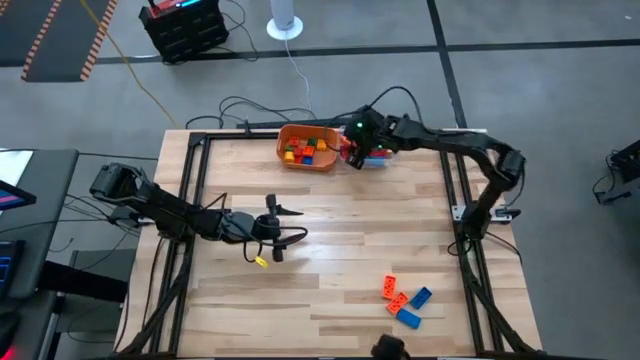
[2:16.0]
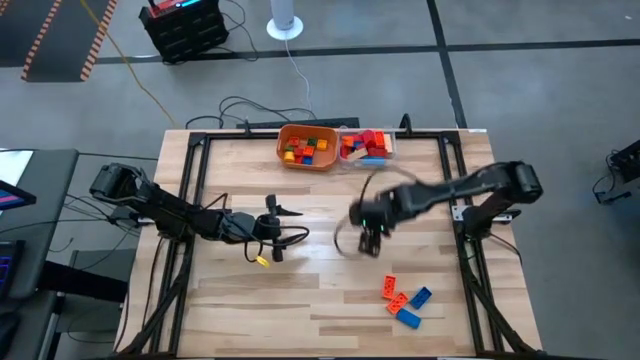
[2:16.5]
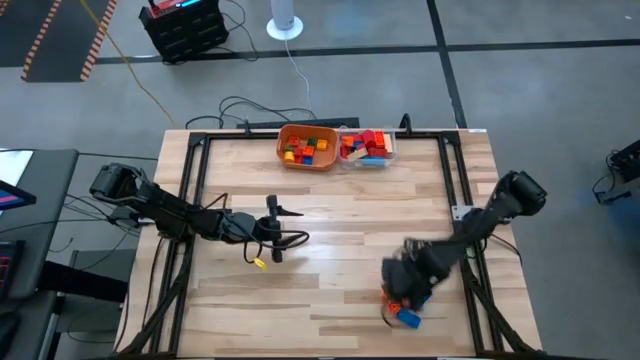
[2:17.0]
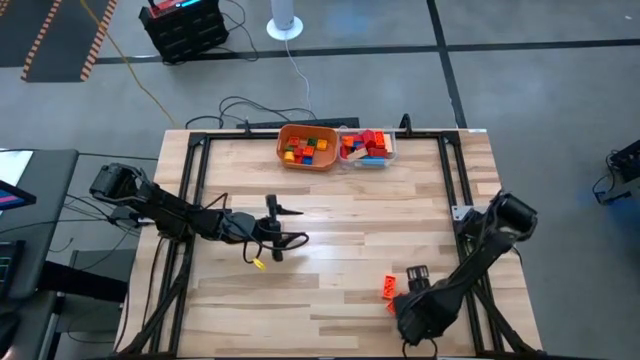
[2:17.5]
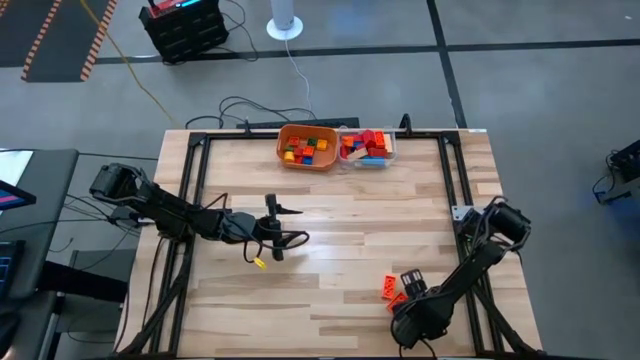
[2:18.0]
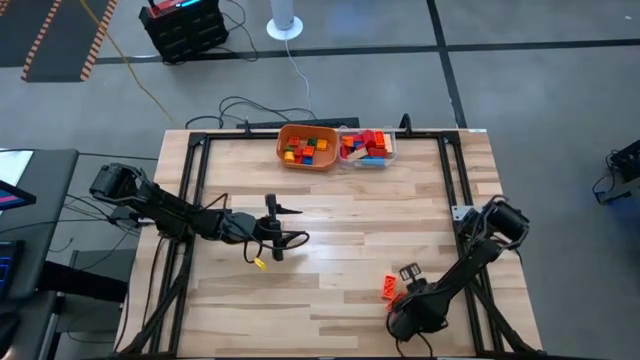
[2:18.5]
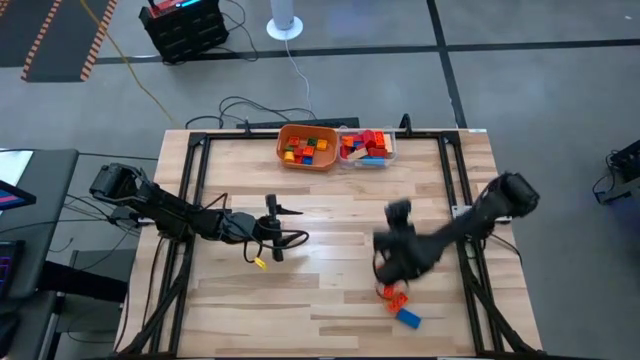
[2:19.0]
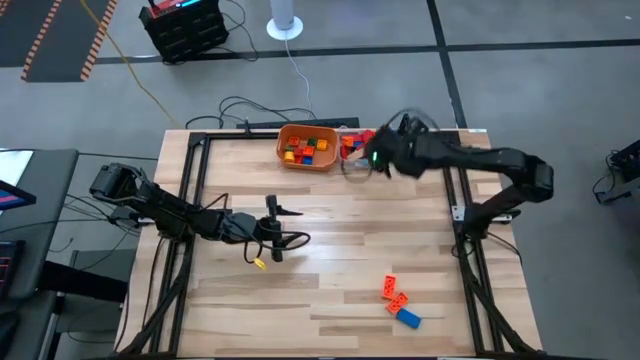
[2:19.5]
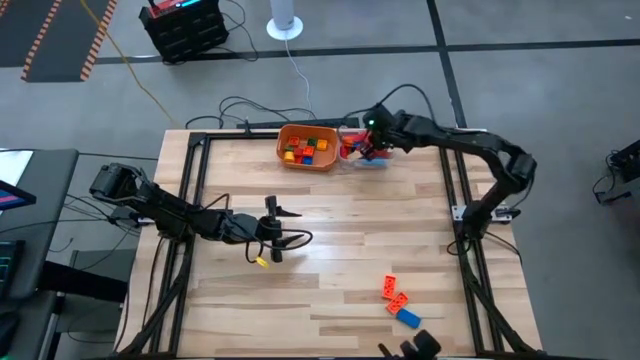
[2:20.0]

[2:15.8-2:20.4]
Task: Sort blocks by size
Put the top blue game piece into the transparent bin

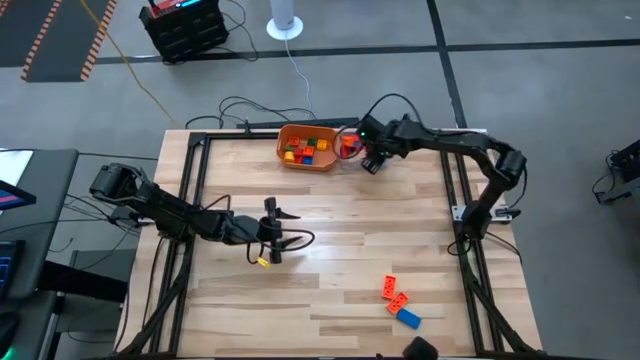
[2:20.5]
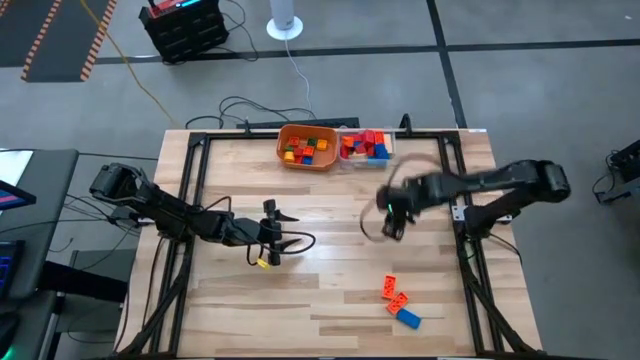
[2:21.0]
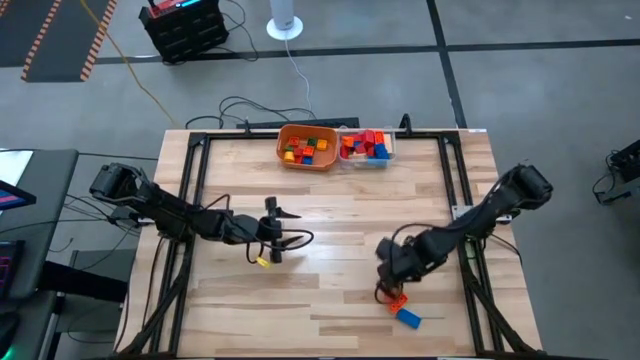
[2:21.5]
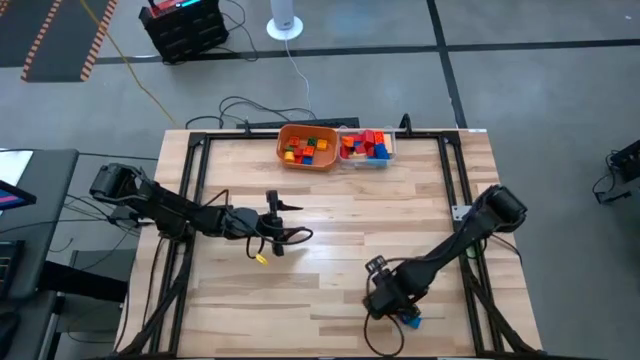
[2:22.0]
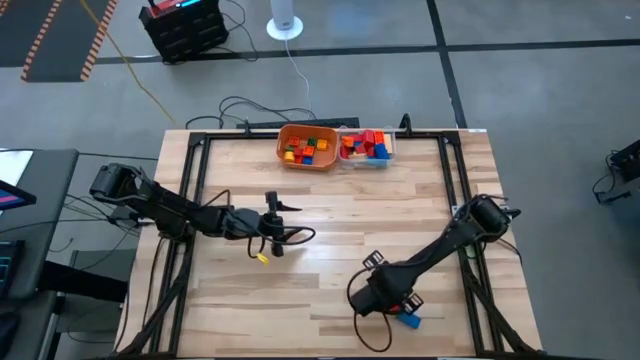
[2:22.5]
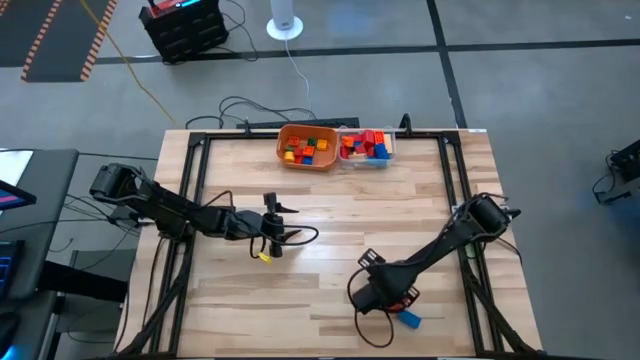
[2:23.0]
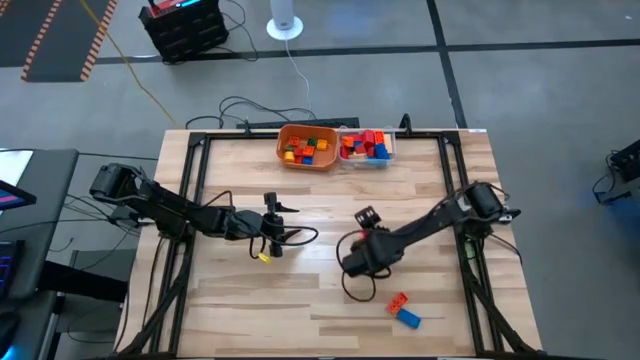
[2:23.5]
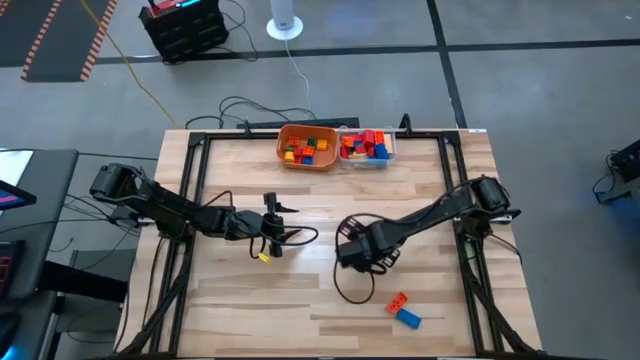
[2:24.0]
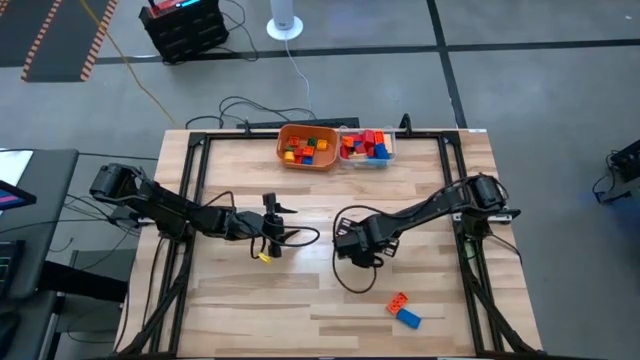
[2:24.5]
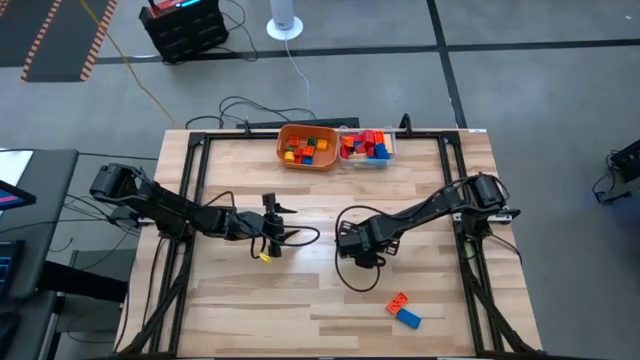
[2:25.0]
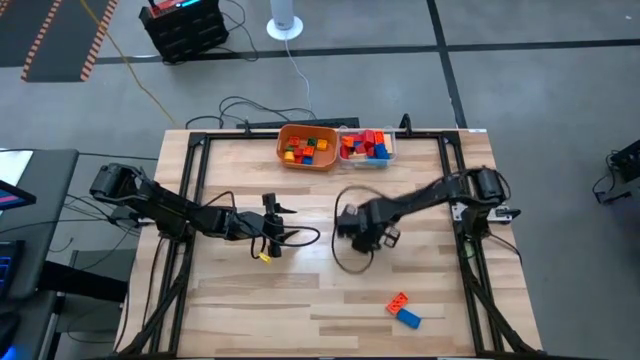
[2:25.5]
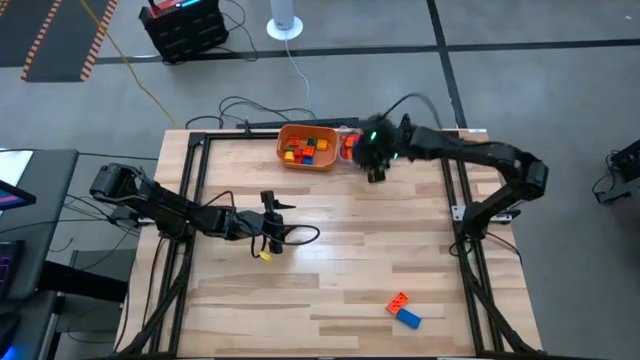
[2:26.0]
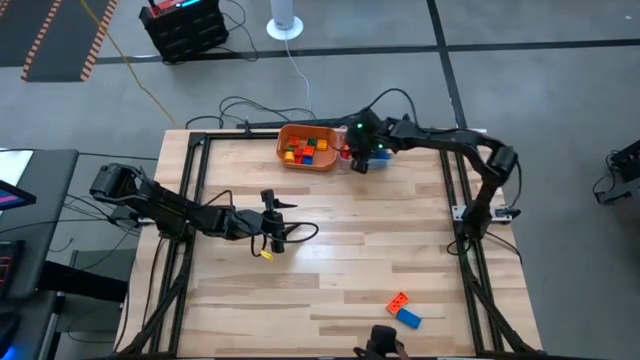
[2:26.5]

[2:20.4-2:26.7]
Put the top orange game piece into the transparent bin

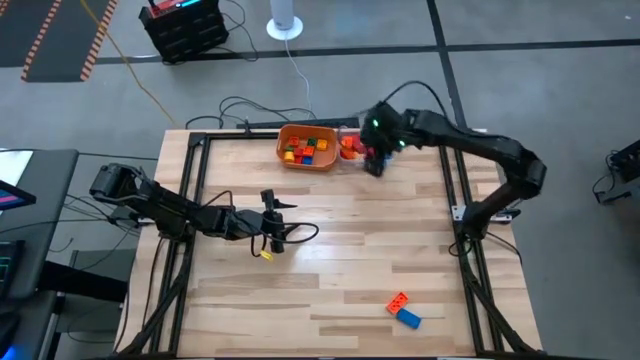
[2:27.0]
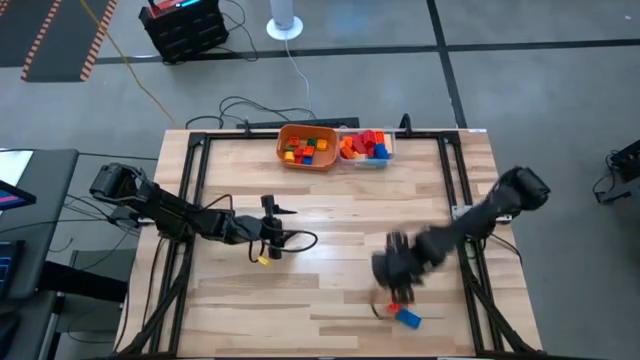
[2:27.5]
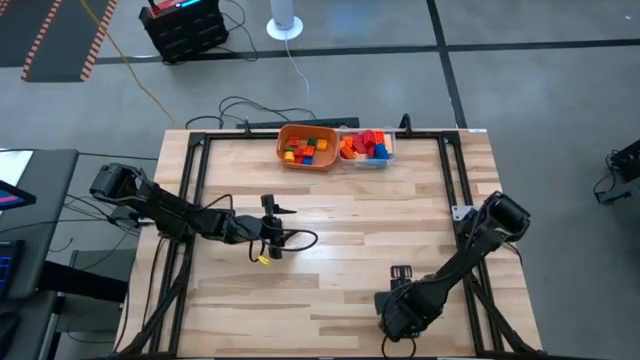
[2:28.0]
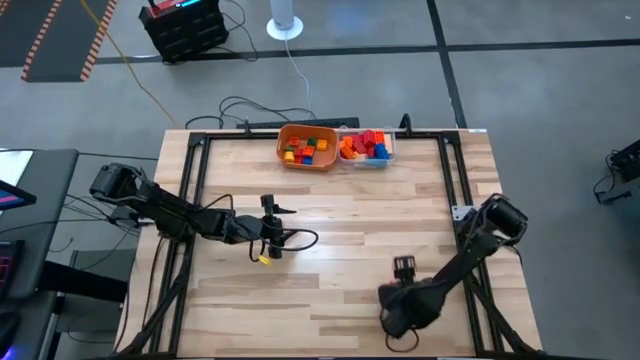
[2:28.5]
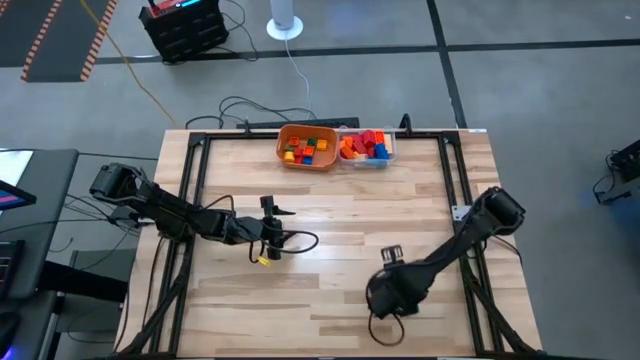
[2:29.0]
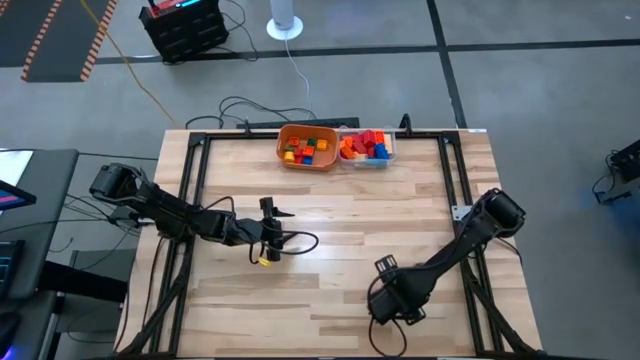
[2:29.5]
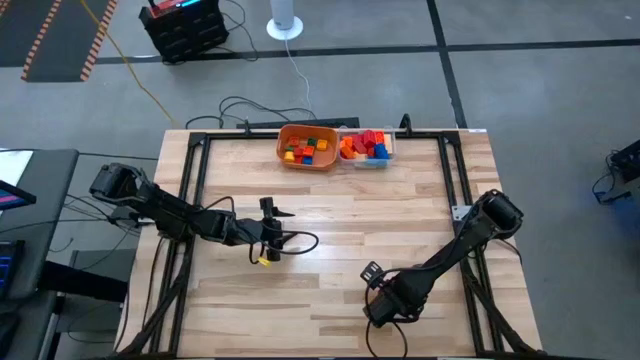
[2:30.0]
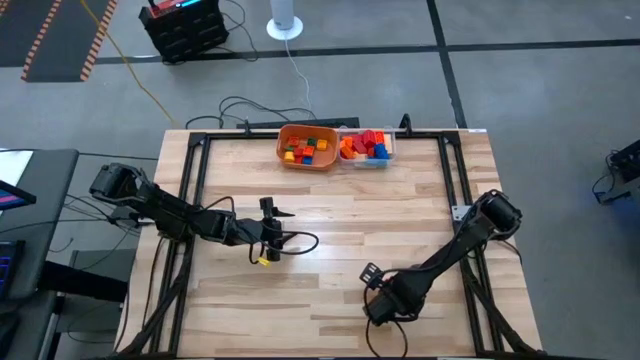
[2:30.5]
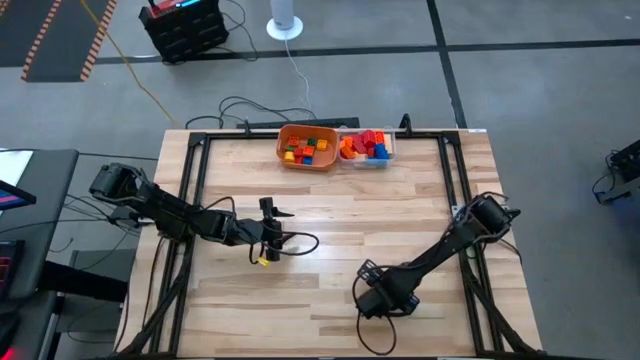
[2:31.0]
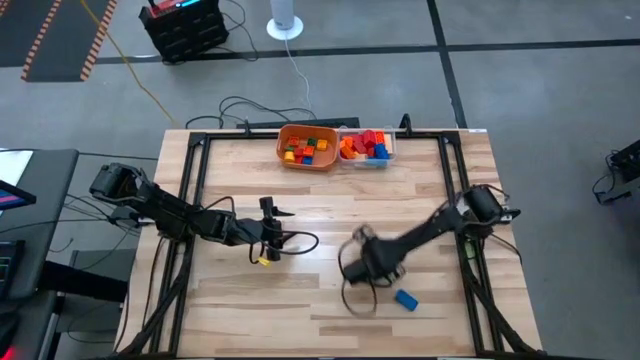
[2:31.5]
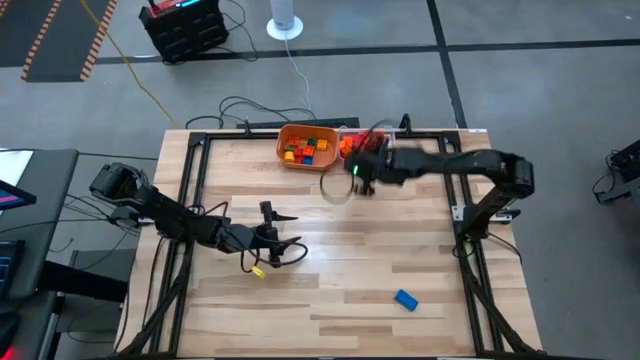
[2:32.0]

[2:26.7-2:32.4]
Put the orange game piece into the transparent bin

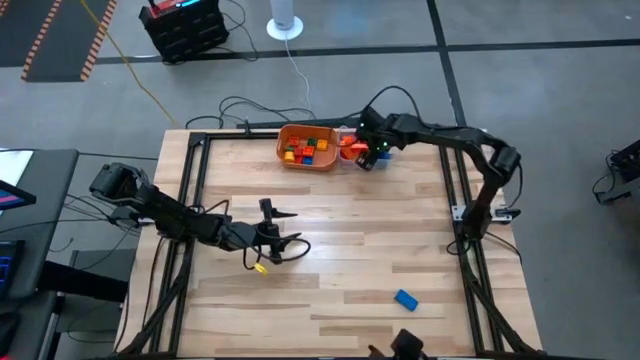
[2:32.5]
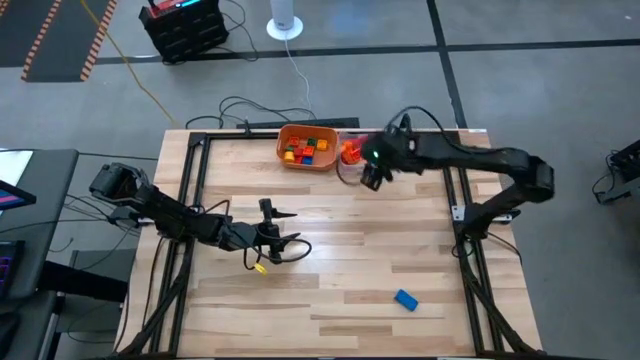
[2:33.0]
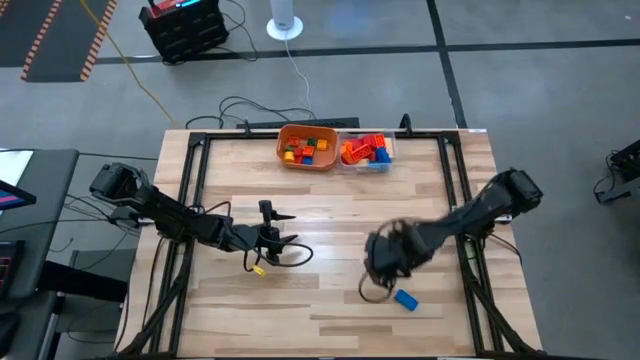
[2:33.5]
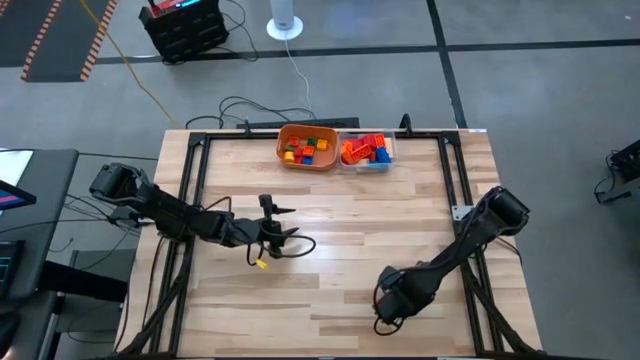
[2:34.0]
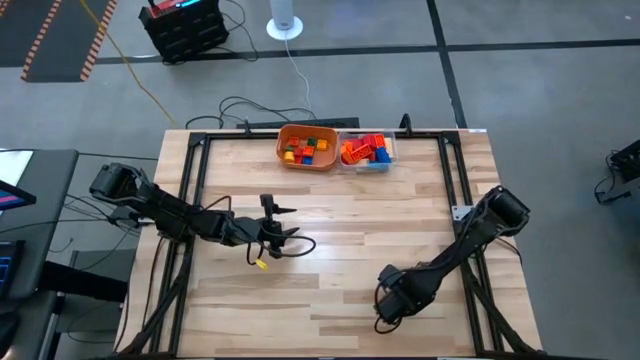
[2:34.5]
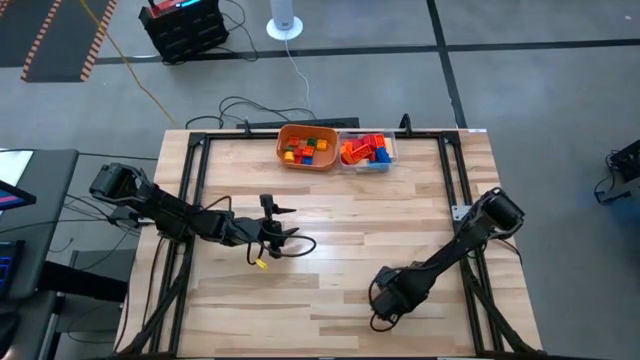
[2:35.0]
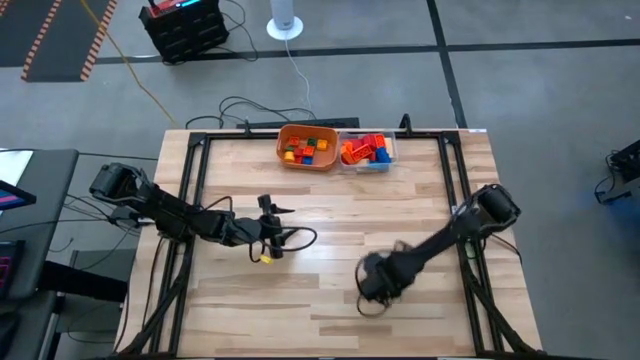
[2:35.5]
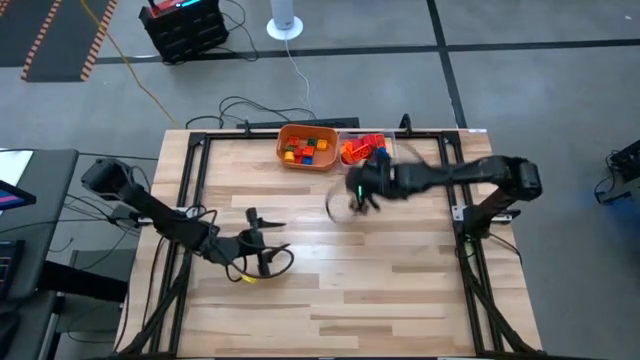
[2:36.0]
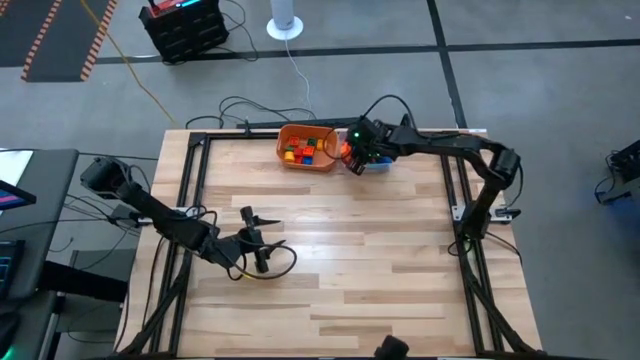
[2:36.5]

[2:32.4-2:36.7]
Put the blue game piece into the transparent bin
